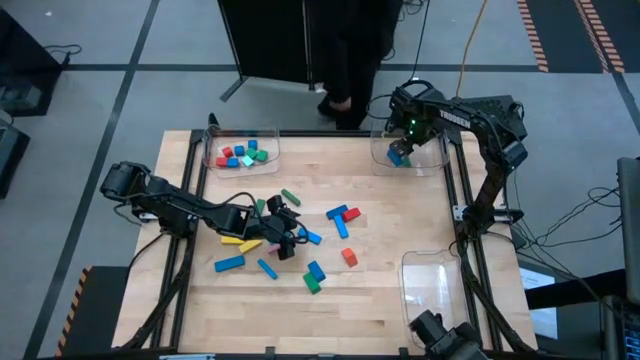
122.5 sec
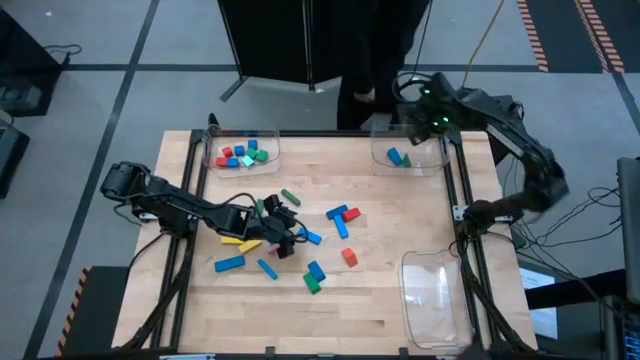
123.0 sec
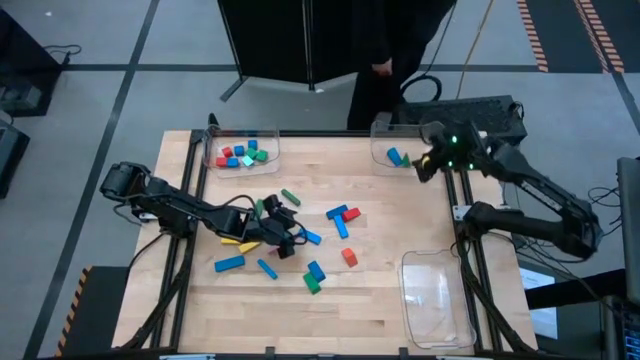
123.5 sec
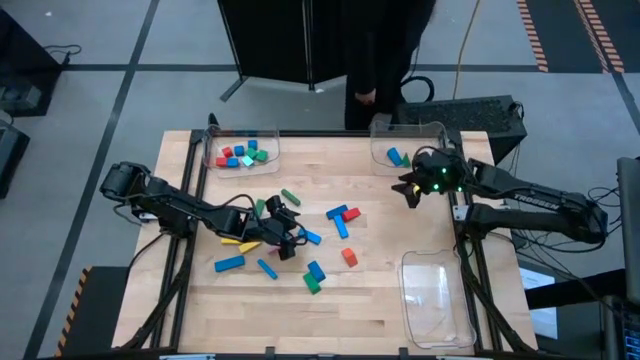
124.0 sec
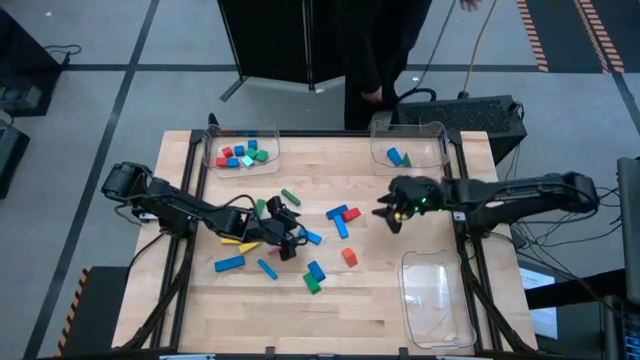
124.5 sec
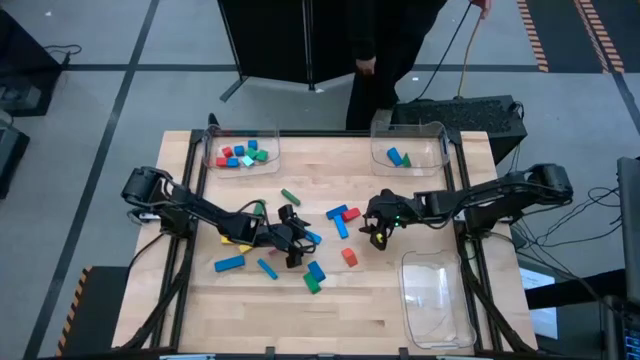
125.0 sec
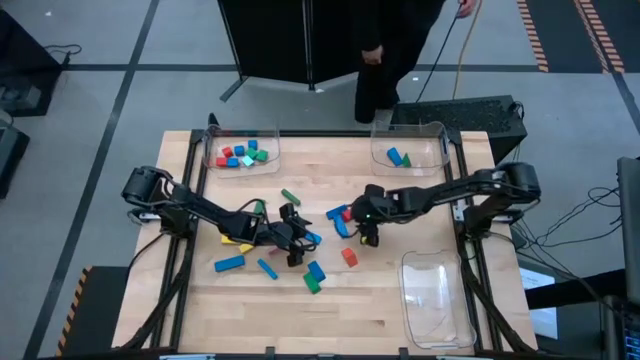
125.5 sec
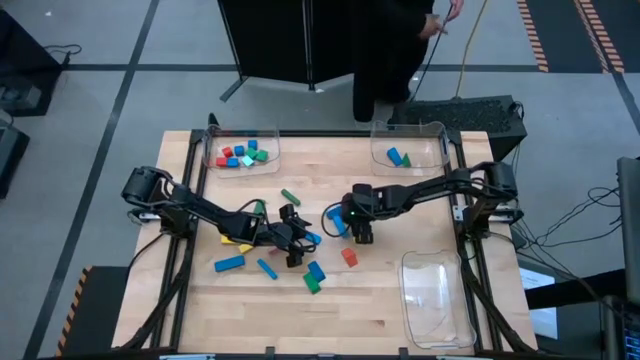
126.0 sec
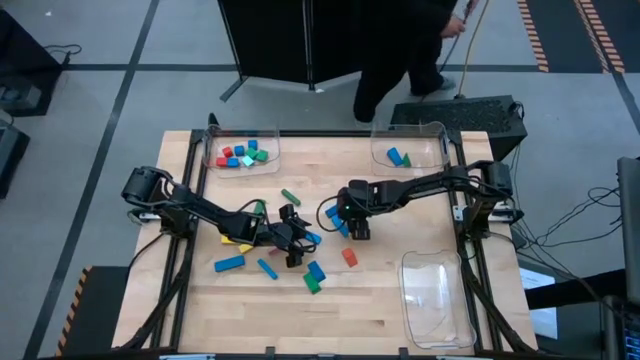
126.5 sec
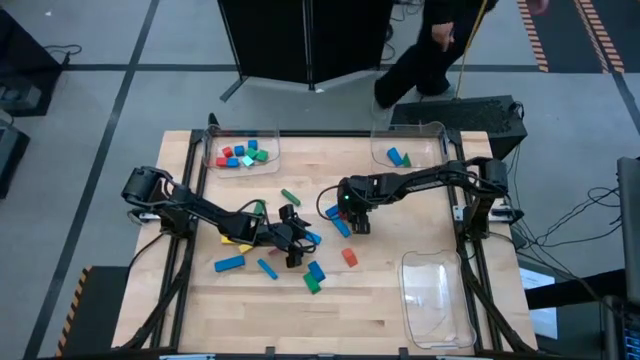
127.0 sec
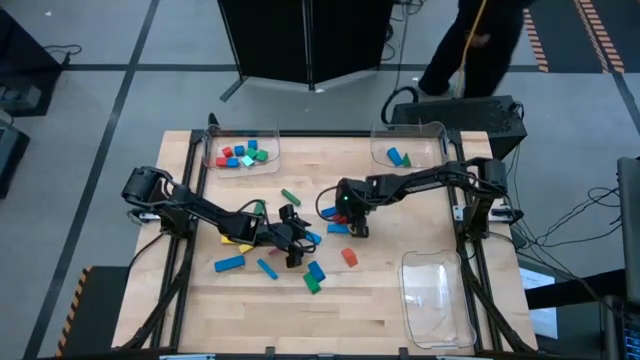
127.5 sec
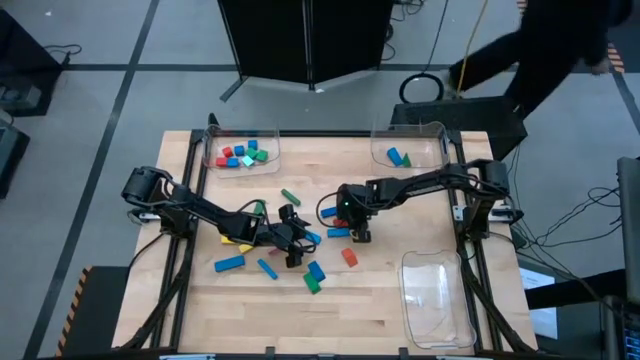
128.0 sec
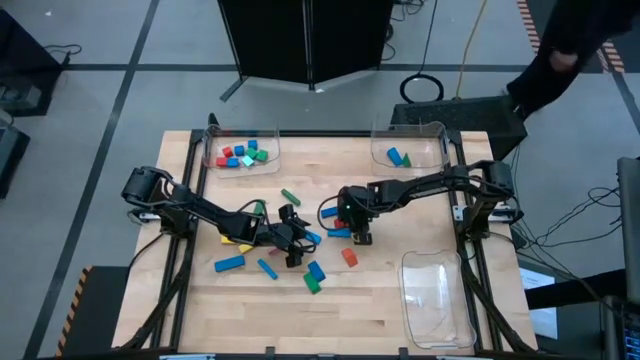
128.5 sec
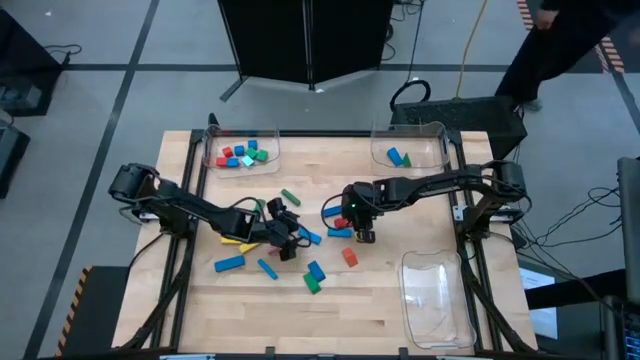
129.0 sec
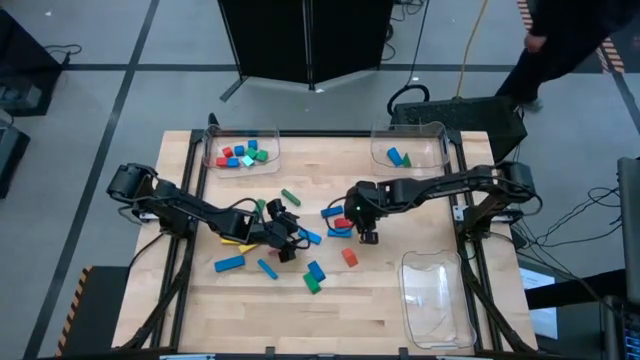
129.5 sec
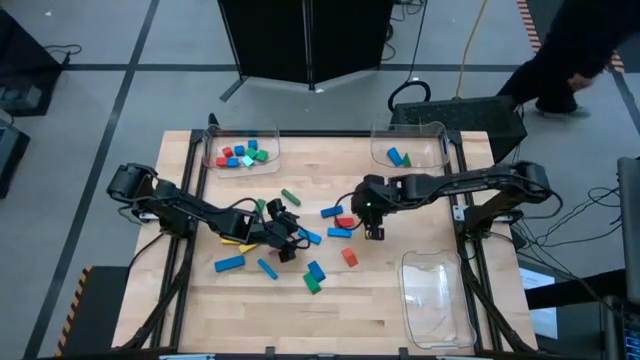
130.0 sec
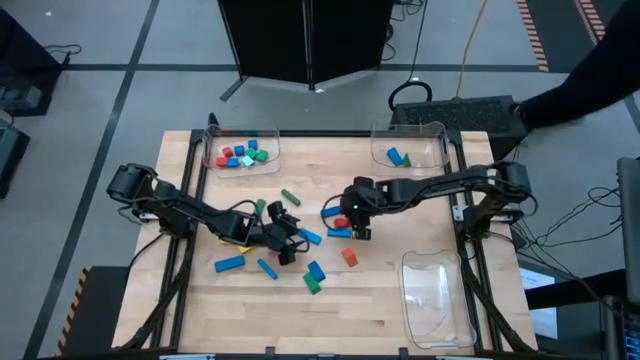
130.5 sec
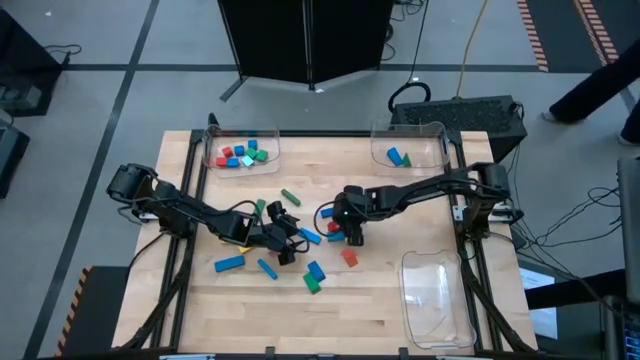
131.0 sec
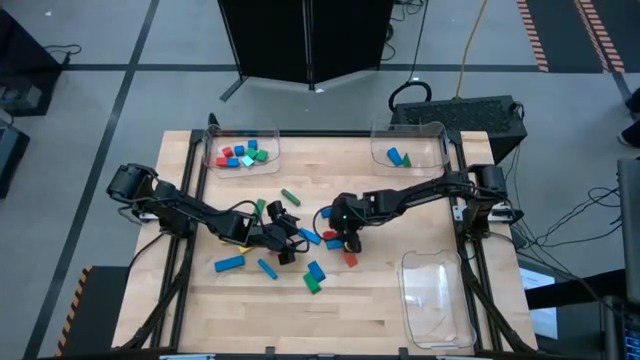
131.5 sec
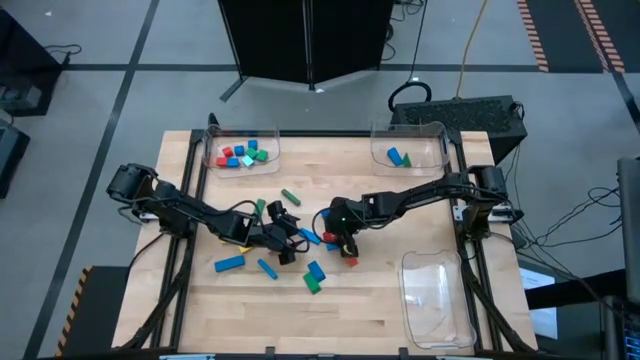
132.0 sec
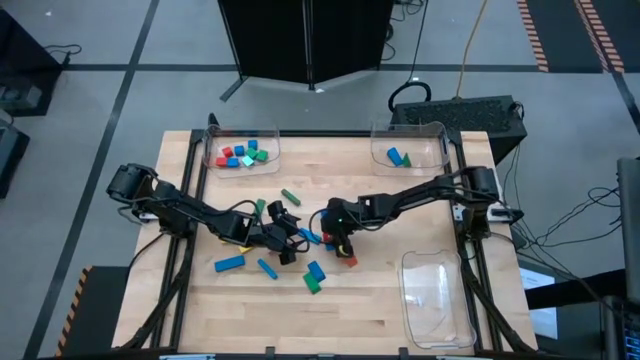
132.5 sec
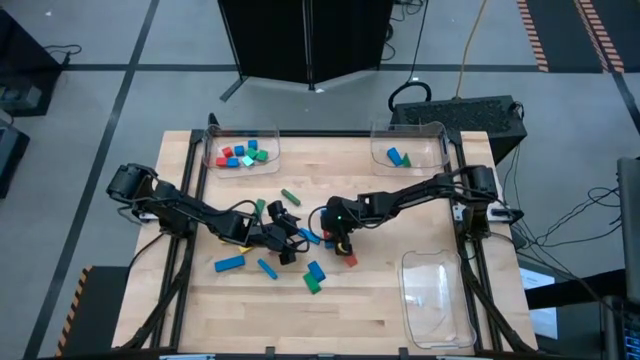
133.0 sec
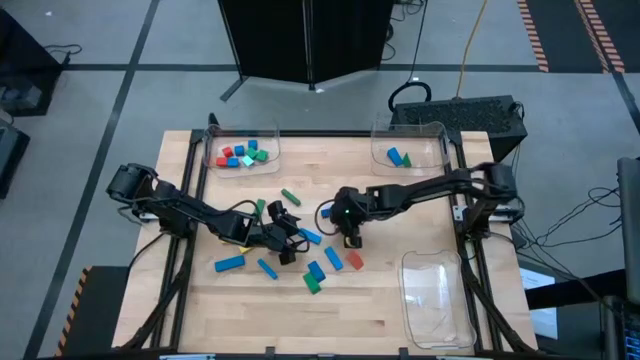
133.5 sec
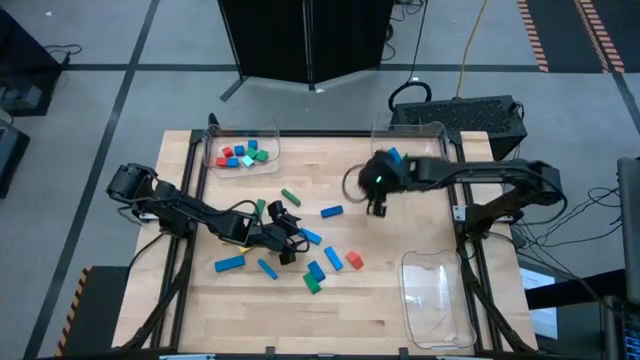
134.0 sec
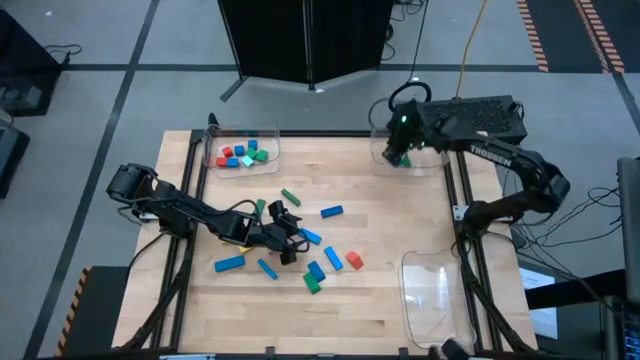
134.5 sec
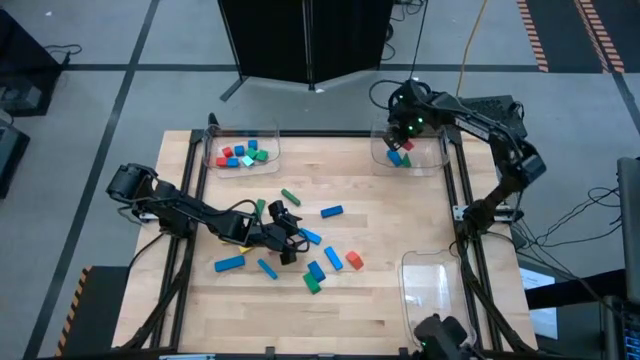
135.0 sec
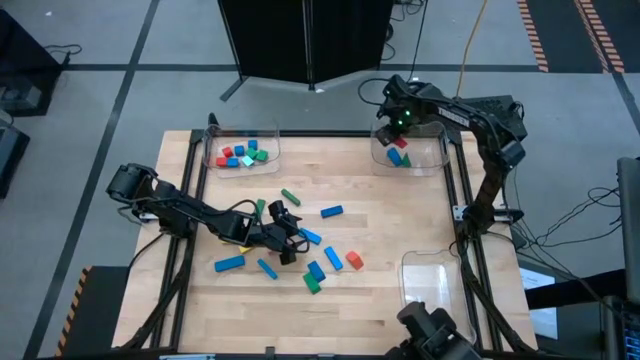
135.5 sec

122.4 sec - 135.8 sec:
Task: Sort blocks by size
Put the red triangular block into the top right transparent bin

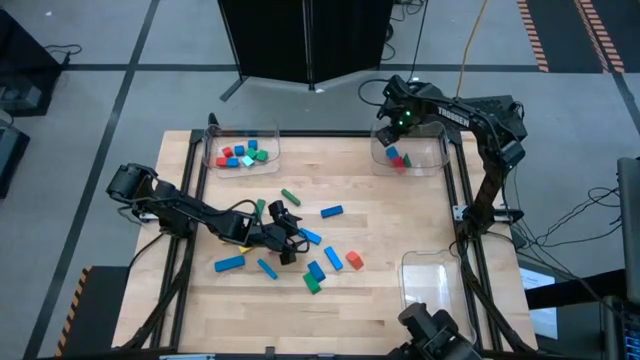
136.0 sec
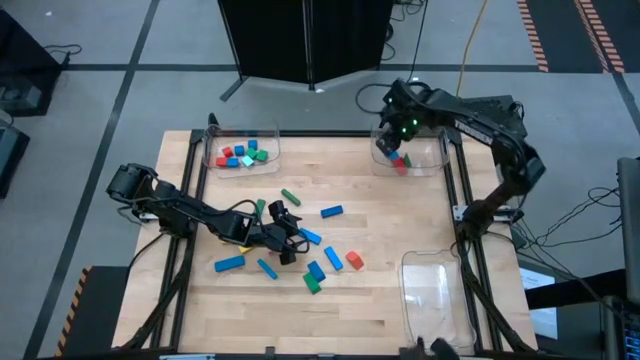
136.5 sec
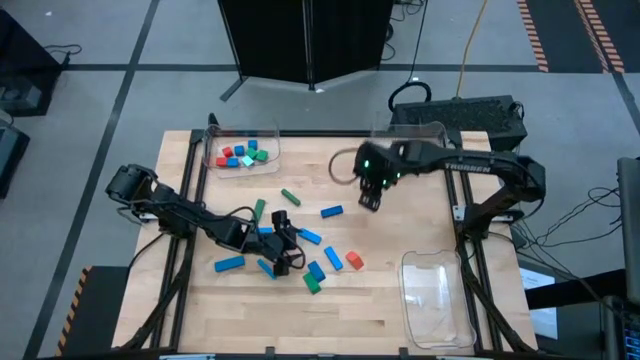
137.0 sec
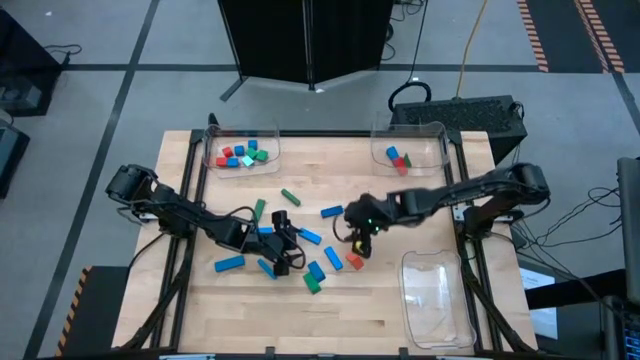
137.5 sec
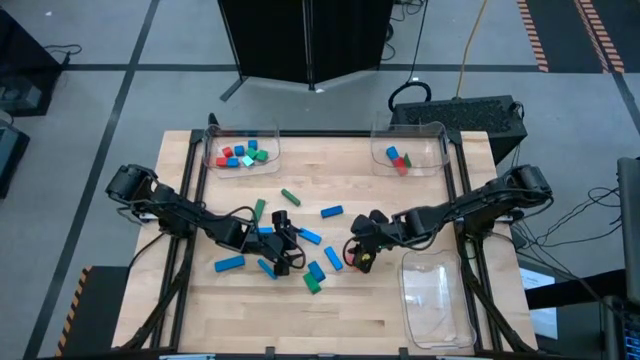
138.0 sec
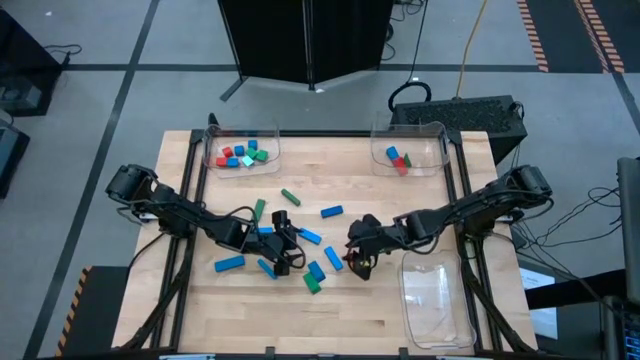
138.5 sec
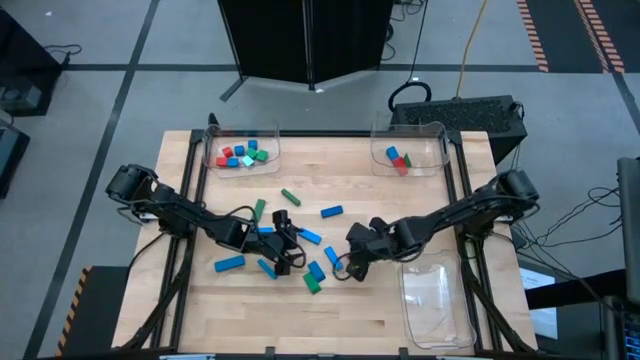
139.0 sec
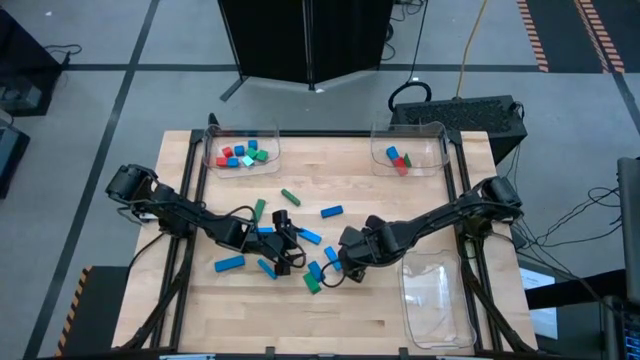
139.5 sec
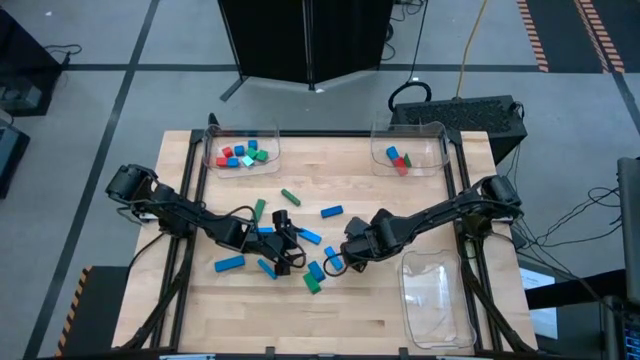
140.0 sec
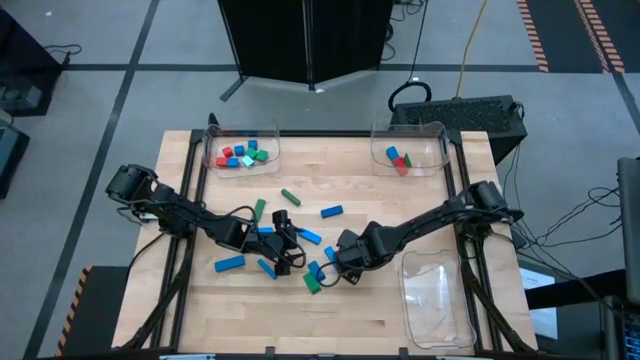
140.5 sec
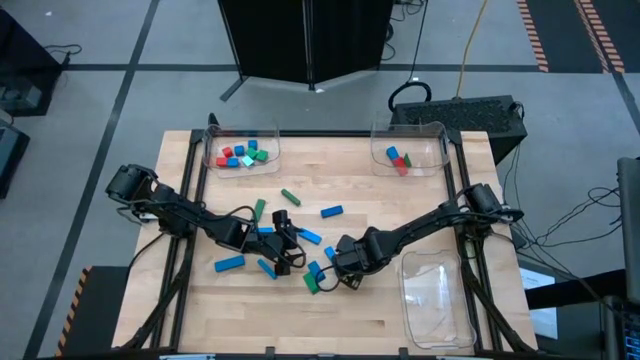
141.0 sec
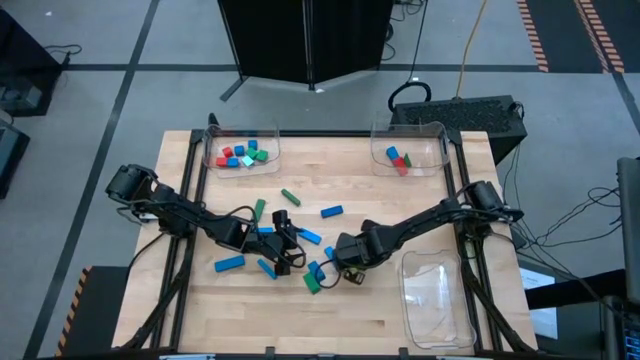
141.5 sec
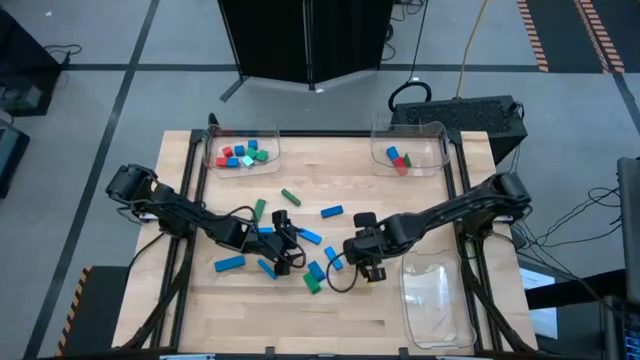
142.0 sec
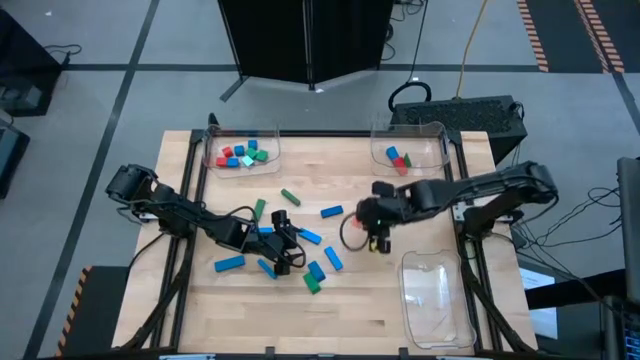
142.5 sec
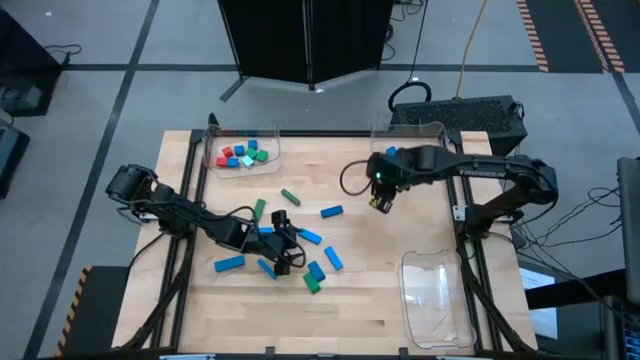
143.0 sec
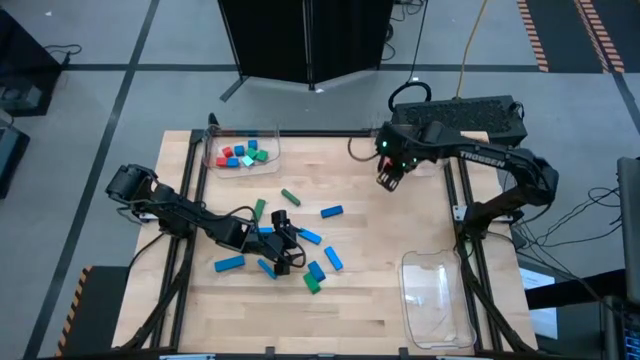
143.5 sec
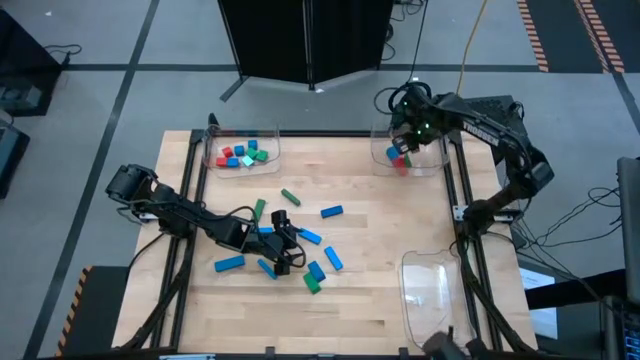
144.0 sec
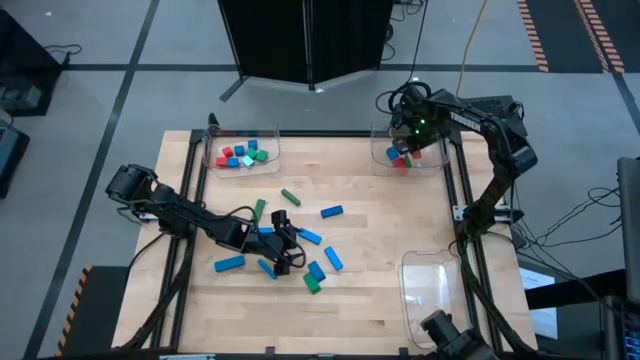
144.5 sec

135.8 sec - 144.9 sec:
Put the orange triangular block into the top right transparent bin
